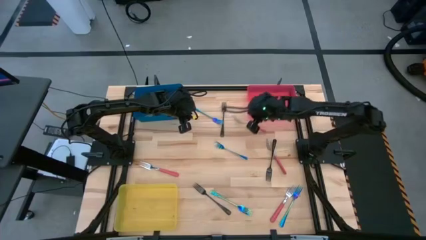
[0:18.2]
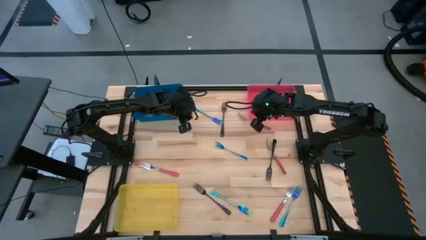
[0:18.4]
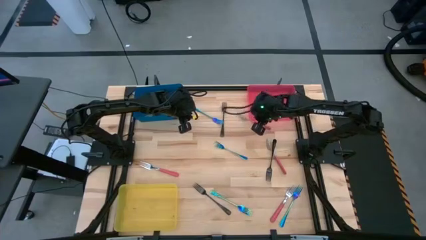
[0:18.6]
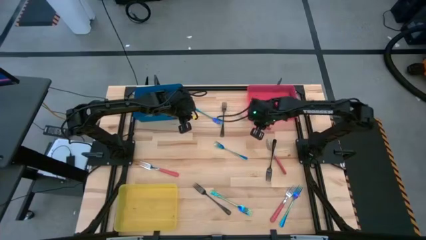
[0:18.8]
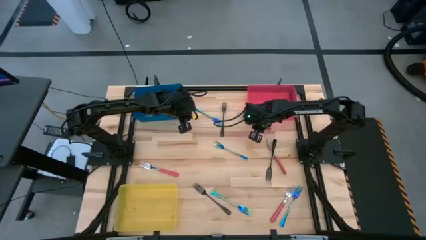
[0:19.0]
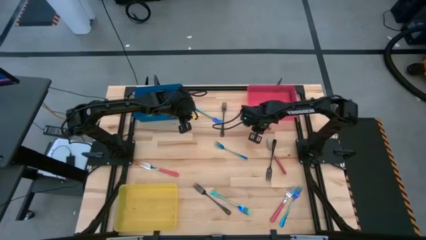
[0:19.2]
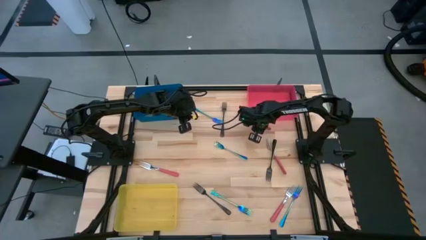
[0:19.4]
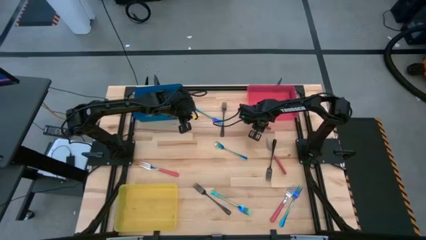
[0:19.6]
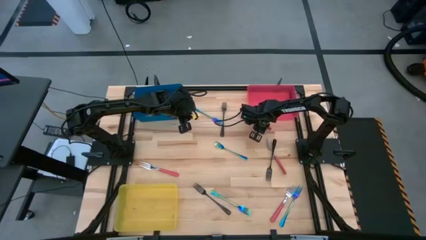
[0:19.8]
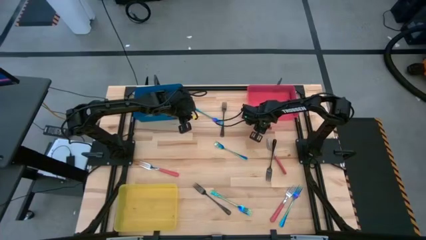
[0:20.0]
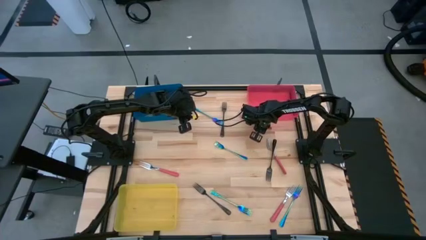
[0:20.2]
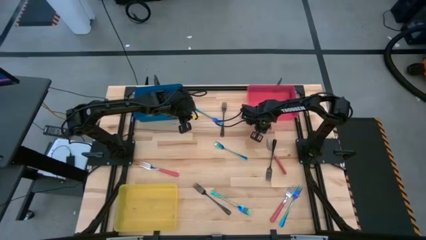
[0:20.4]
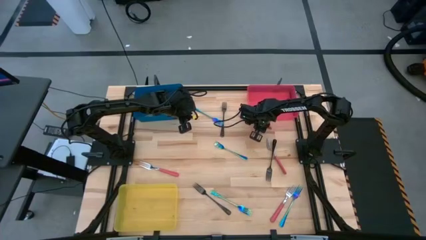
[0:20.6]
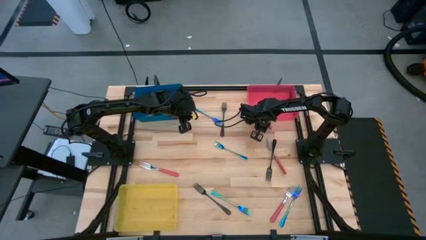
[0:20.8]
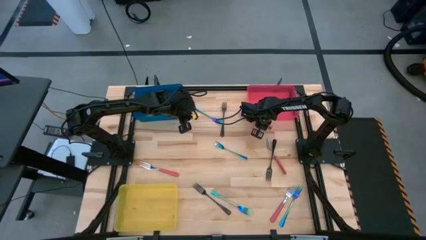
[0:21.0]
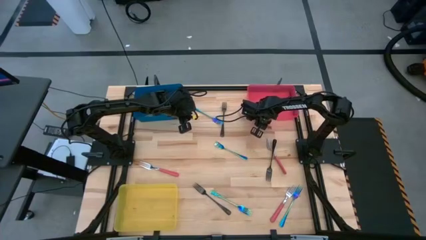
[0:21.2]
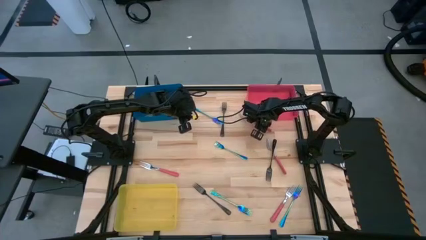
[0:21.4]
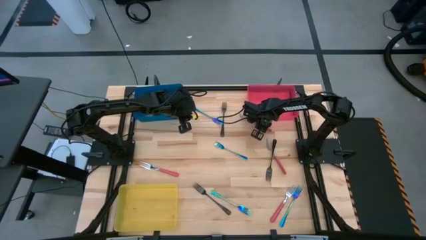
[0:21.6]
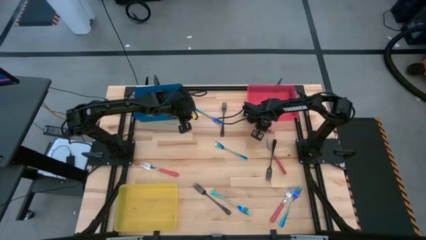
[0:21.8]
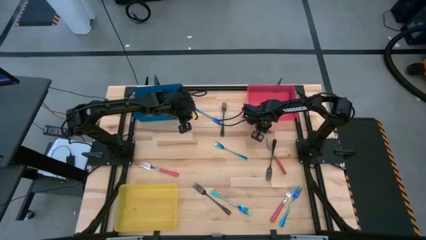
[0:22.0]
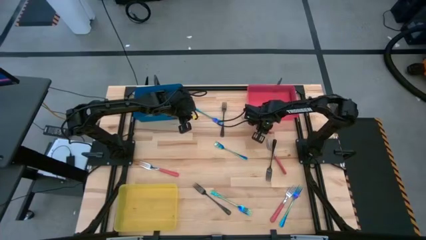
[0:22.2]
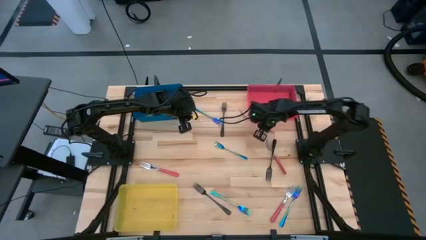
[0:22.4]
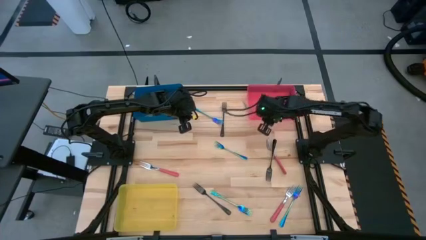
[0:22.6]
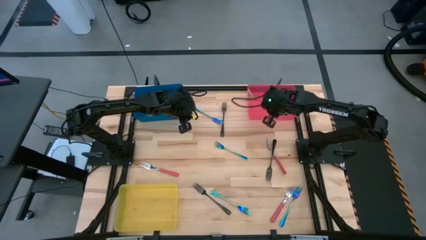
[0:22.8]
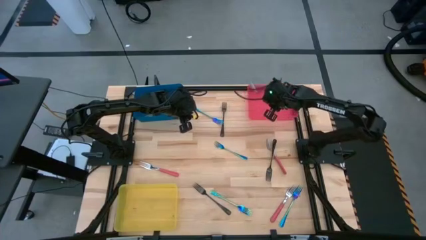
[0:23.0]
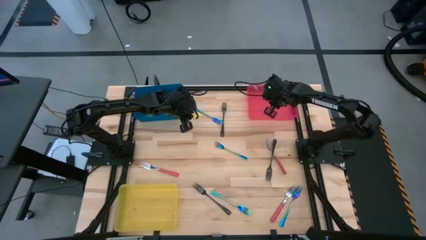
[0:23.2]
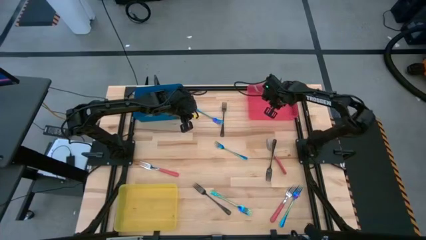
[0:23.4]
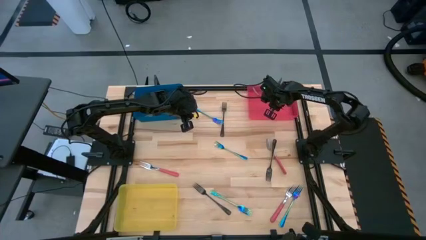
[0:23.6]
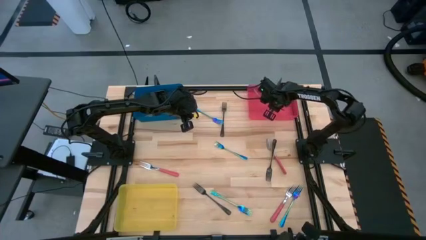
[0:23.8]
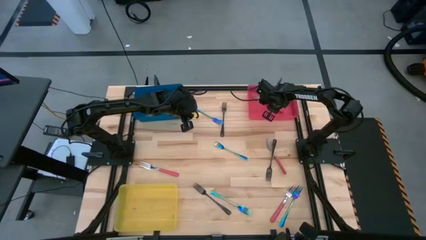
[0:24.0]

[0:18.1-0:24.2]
Task: Sort silverware by color (type)
Put the top center pink fork into the pink bin

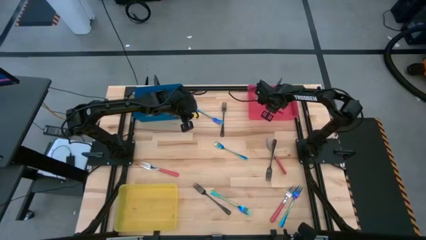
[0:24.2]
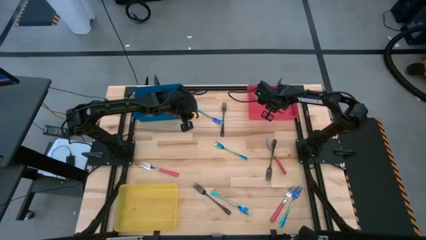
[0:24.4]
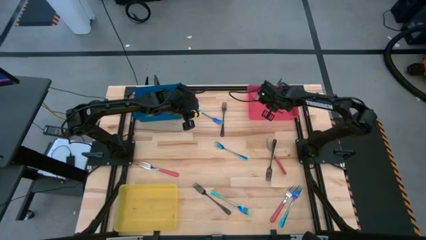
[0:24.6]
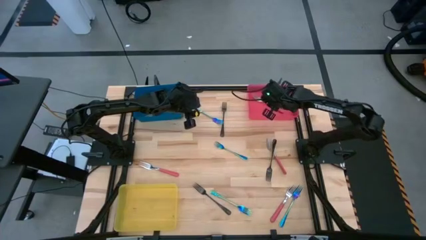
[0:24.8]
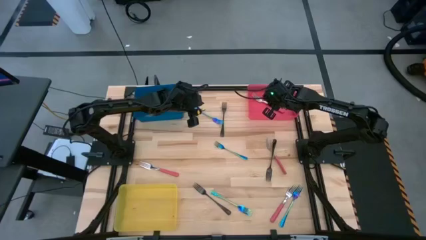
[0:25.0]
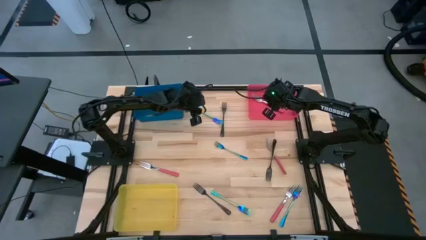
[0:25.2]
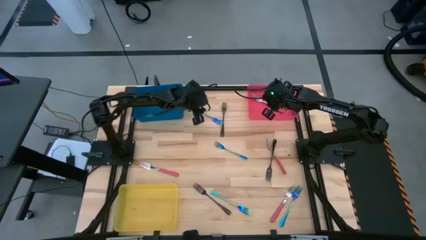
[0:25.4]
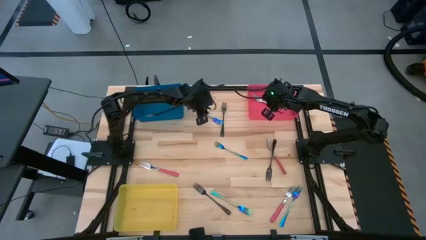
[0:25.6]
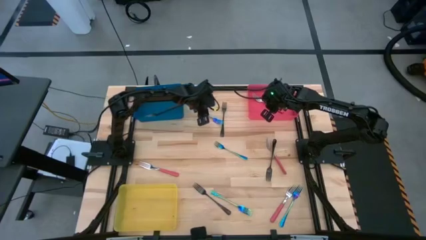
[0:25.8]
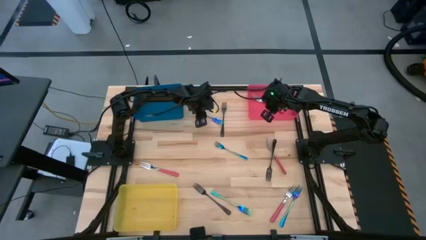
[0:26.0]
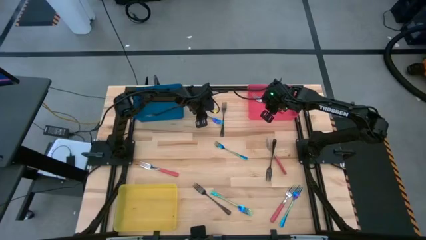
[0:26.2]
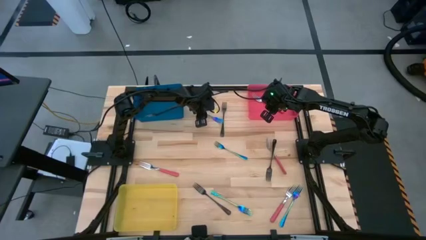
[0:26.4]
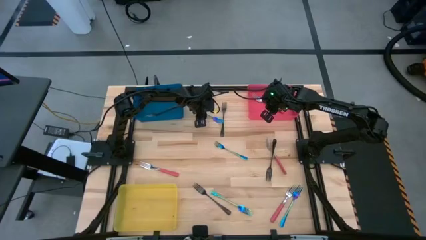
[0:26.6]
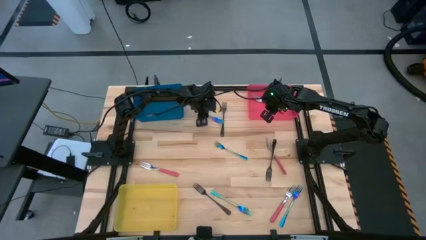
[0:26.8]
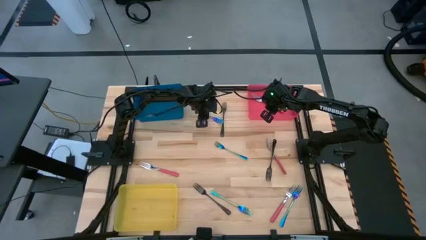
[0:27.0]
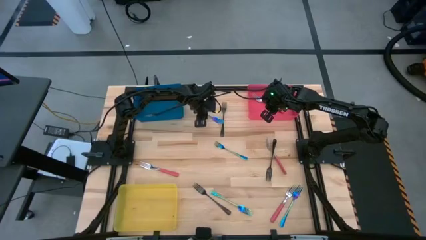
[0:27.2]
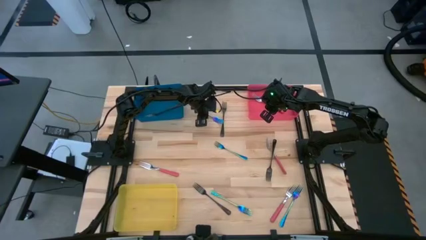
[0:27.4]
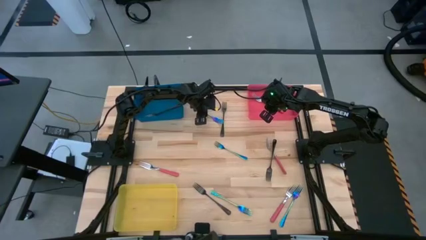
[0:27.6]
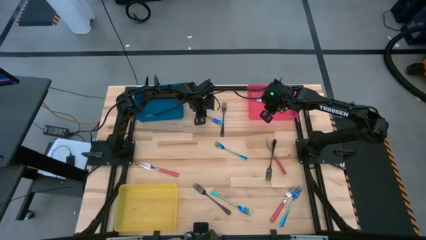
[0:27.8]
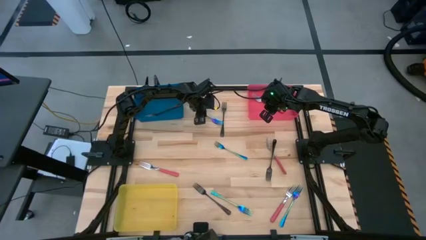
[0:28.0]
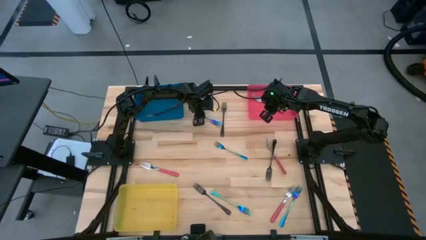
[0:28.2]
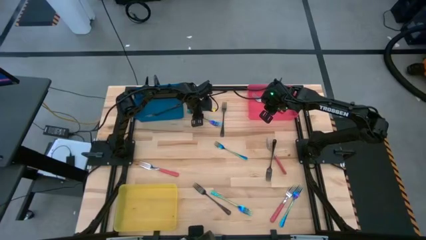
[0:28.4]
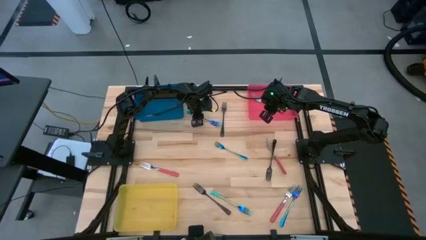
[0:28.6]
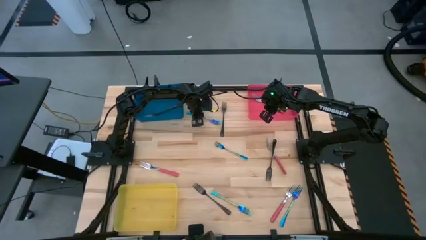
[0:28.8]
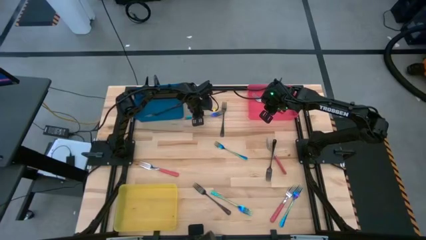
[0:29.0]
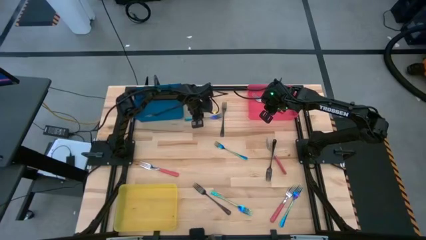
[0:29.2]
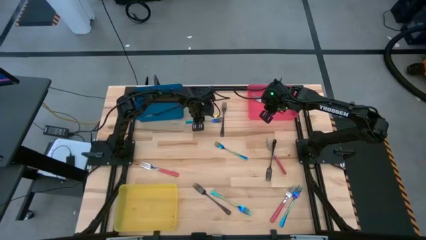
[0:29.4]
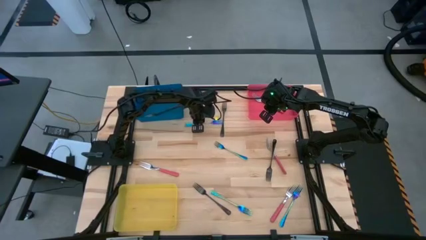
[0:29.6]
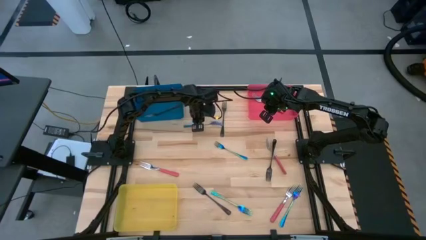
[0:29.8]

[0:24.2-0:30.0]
Put the top left iridescent fork into the yellow bin

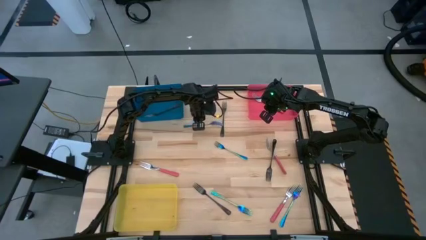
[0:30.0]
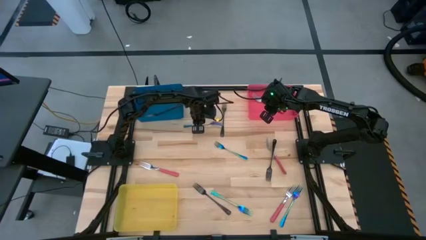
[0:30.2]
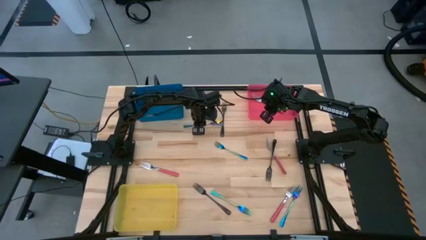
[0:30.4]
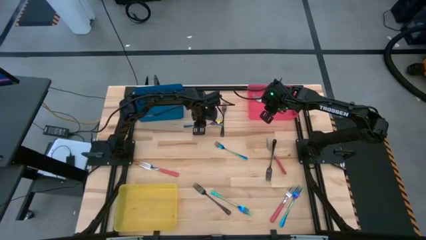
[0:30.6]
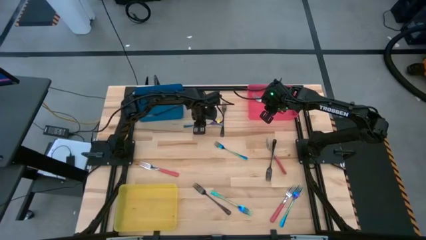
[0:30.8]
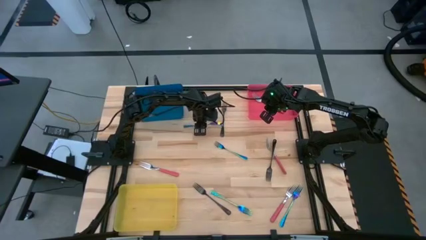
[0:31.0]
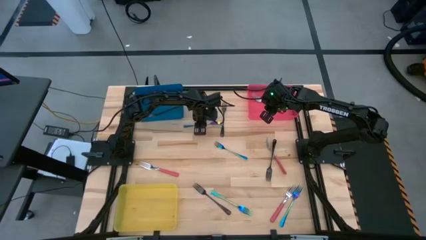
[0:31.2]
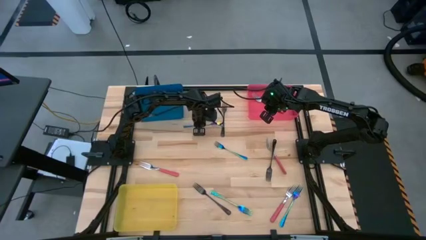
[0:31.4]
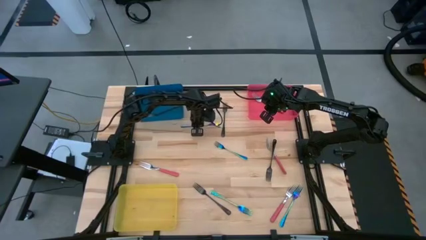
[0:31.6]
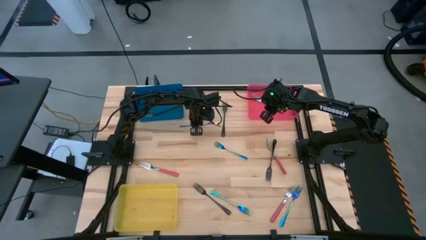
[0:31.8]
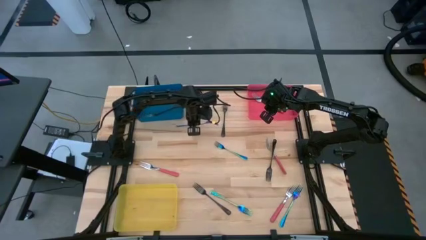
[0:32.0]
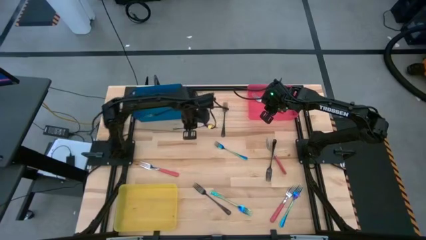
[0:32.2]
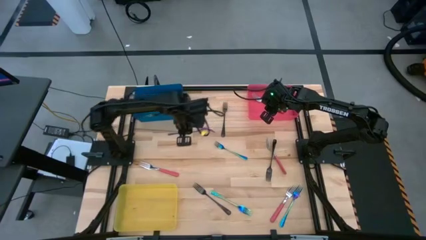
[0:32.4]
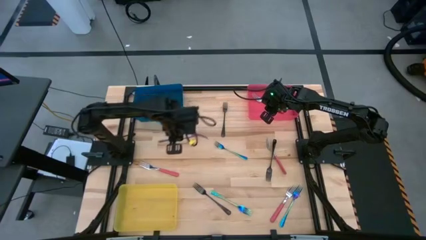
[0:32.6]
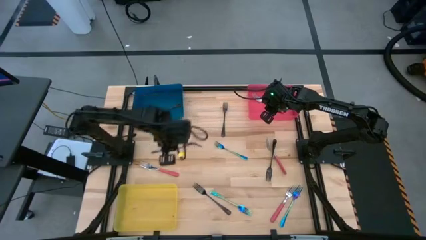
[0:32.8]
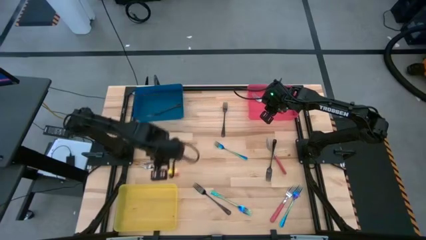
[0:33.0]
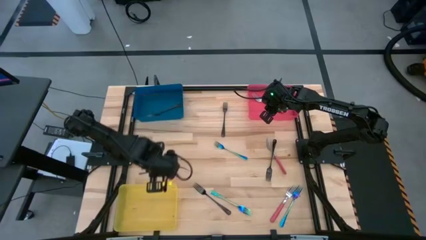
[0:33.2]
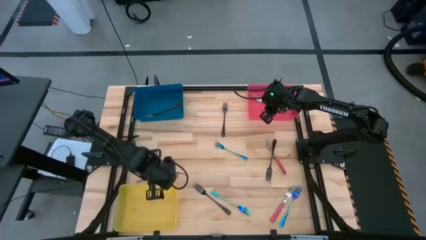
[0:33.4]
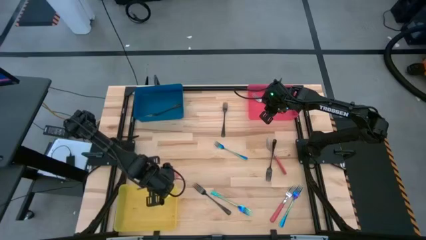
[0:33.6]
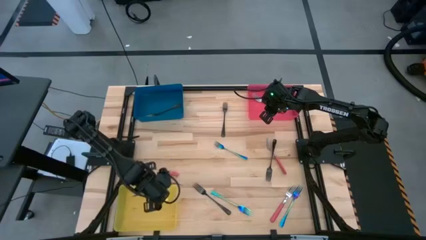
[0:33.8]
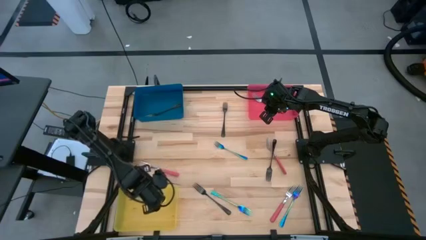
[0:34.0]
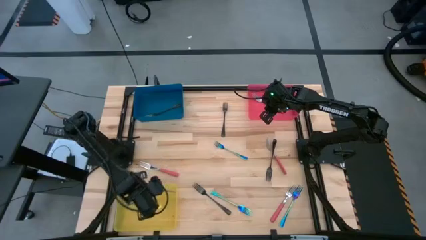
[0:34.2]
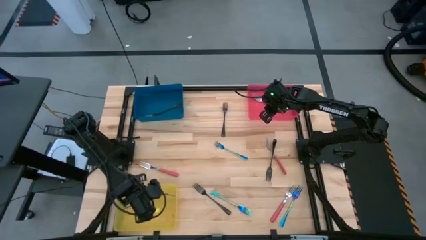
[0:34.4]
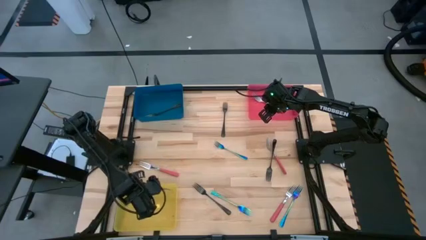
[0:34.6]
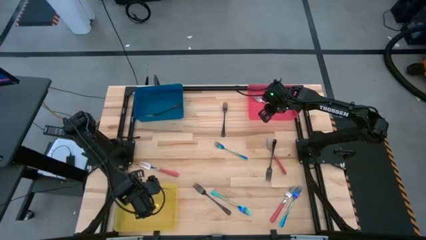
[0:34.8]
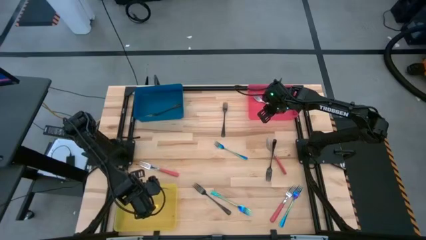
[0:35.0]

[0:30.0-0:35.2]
Put the top left iridescent fork into the yellow bin
